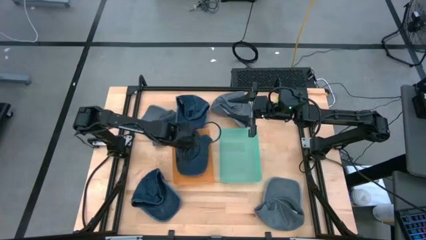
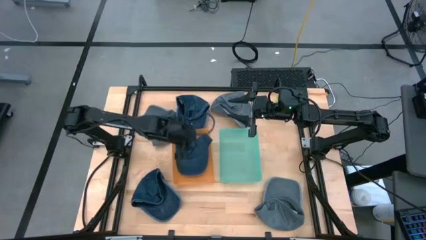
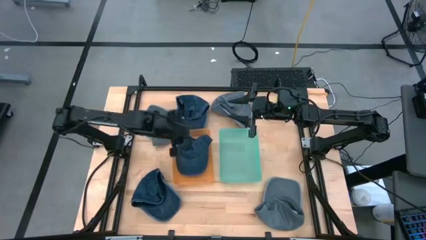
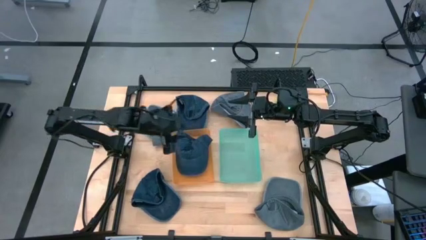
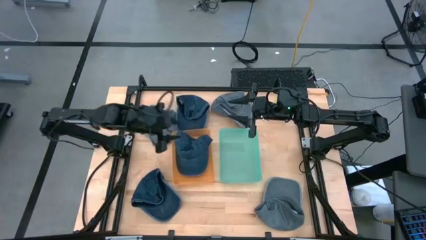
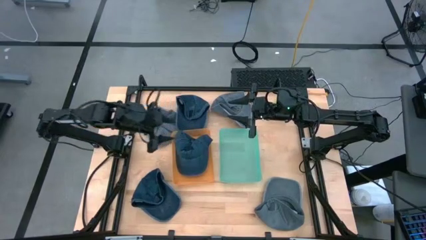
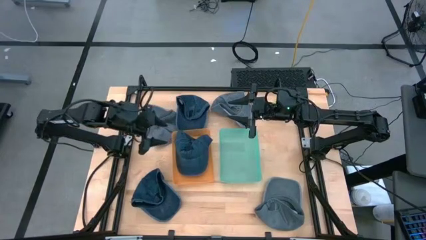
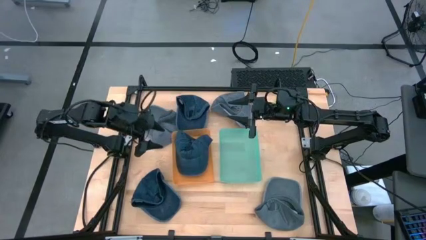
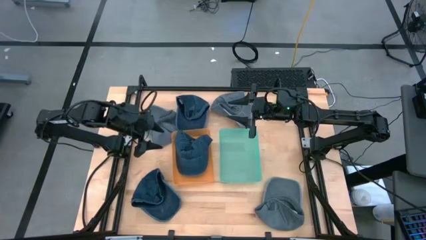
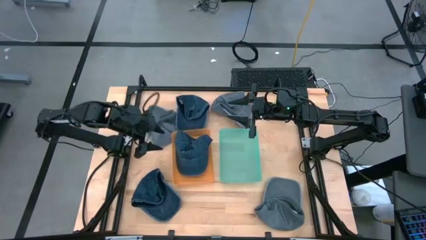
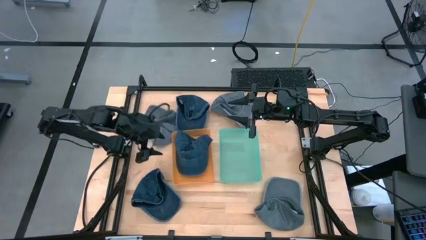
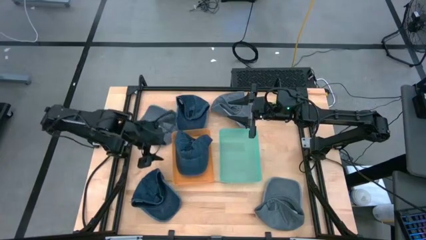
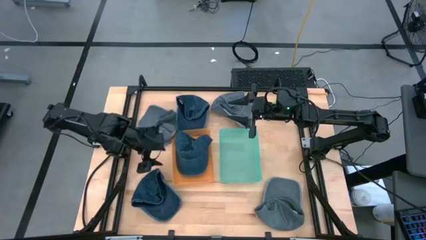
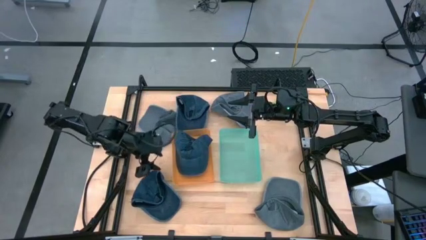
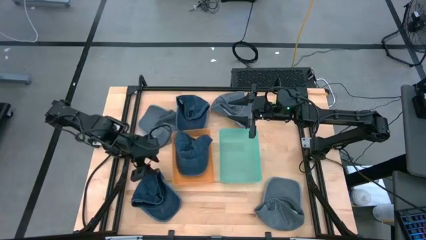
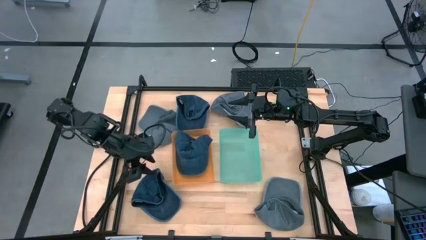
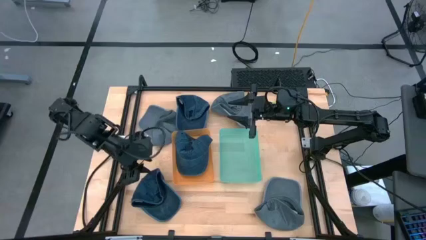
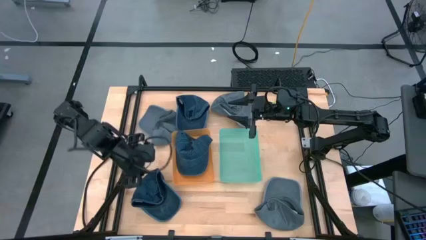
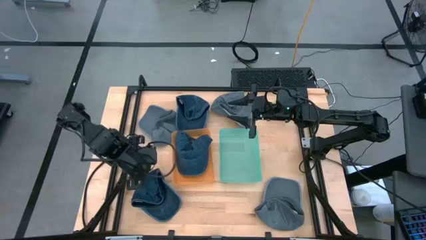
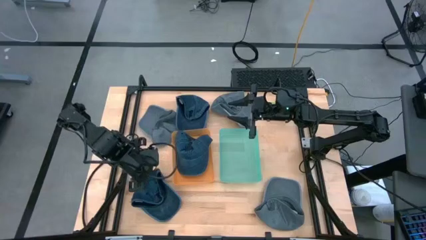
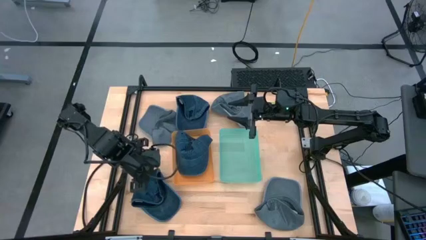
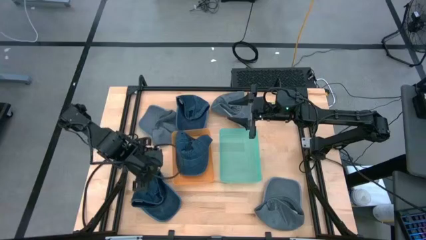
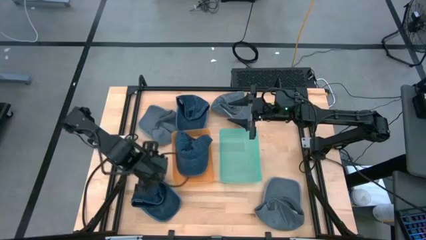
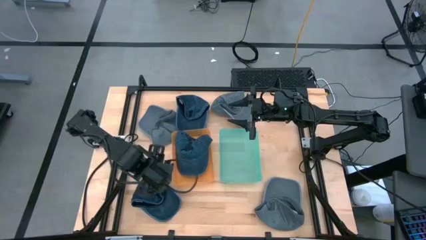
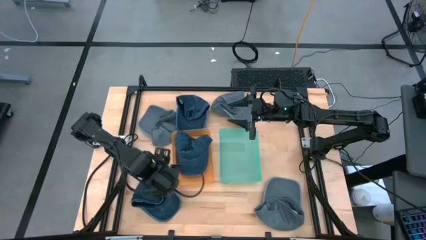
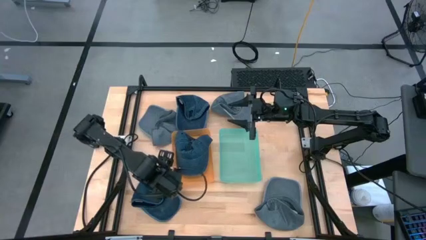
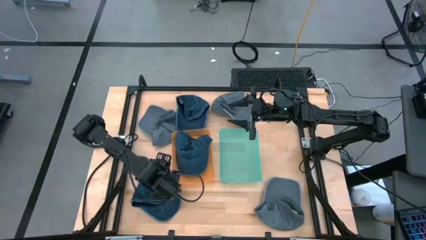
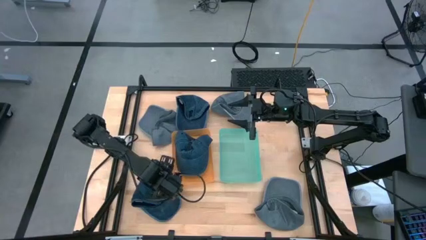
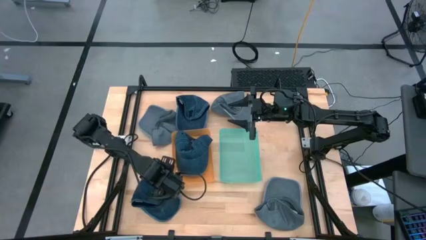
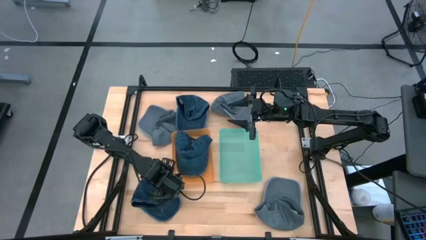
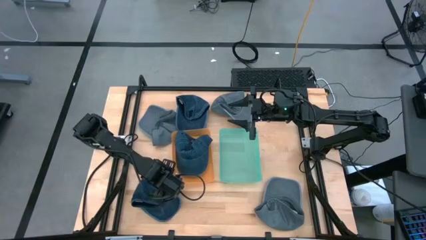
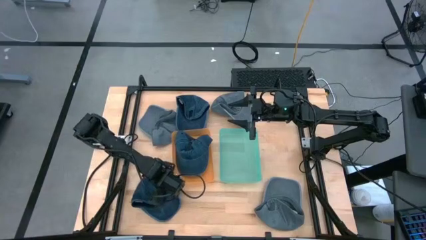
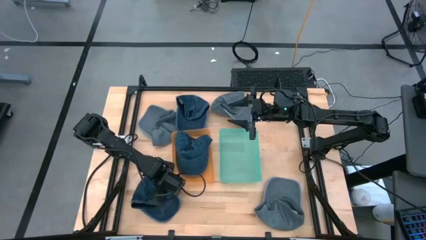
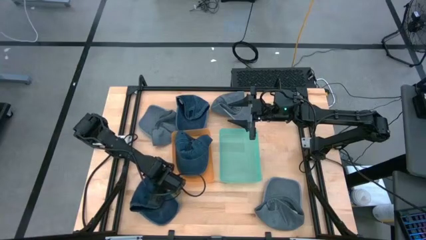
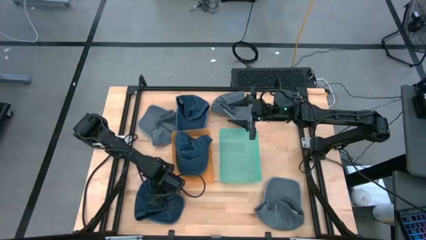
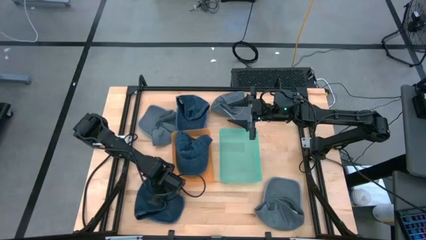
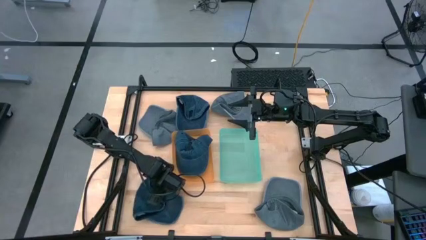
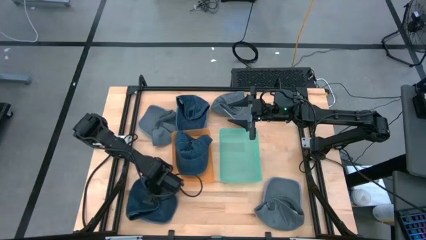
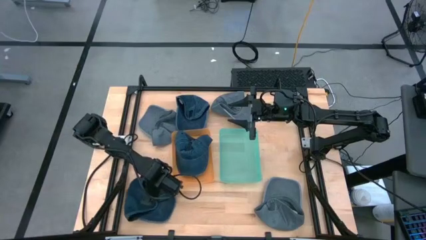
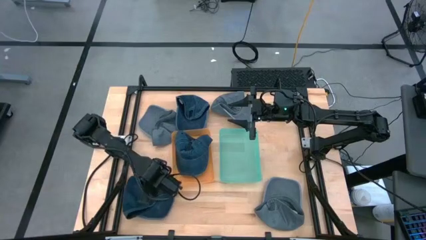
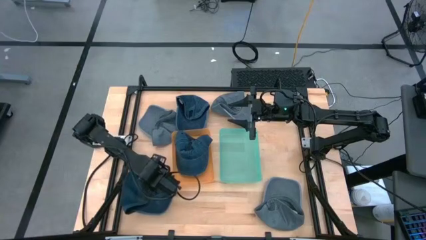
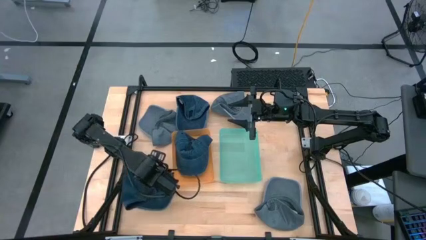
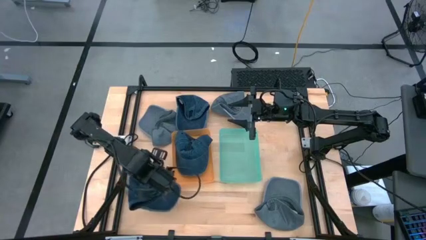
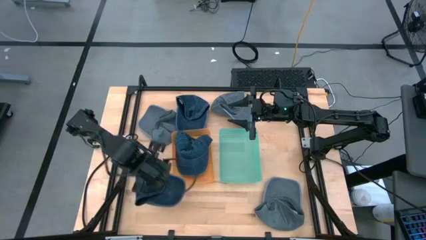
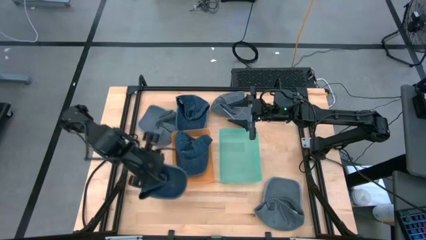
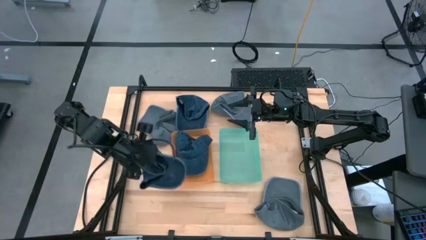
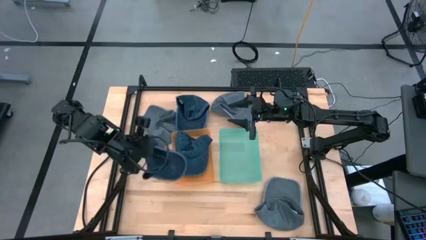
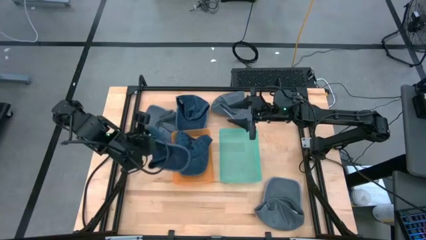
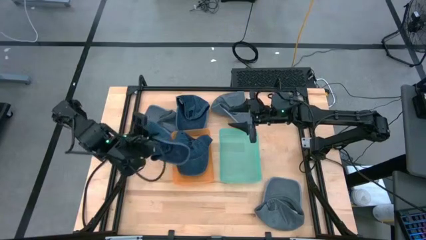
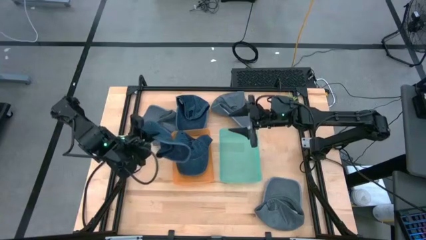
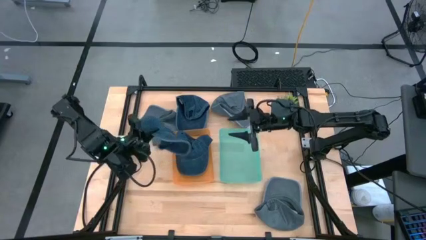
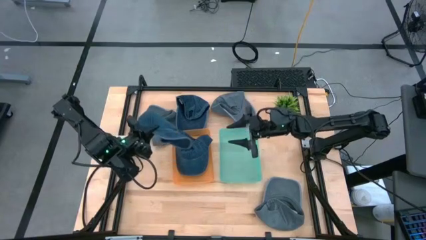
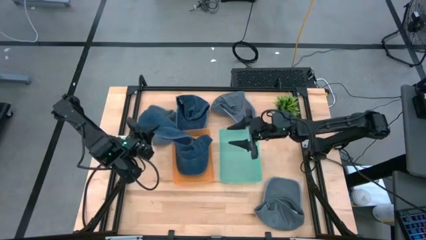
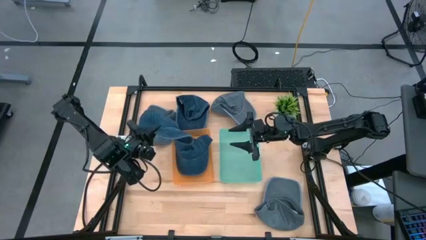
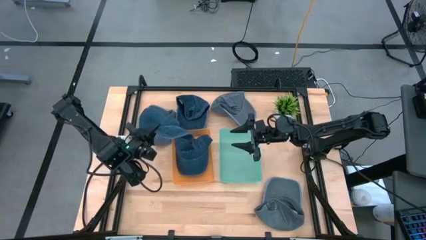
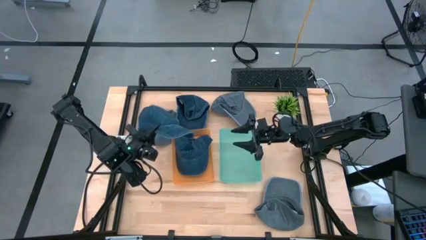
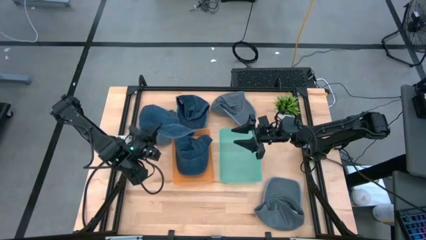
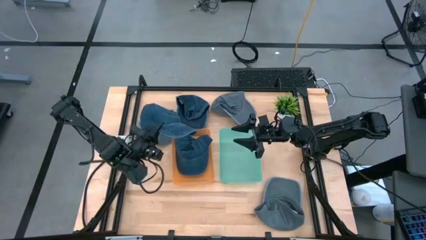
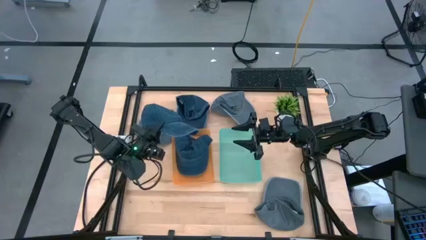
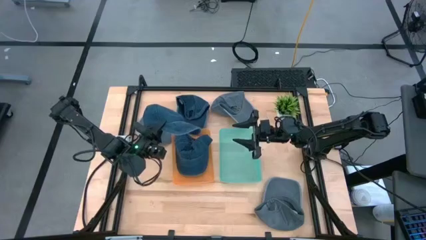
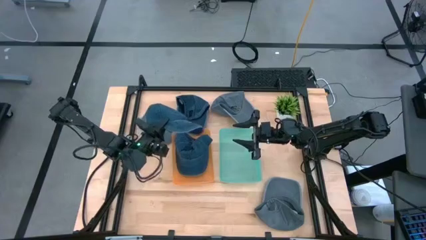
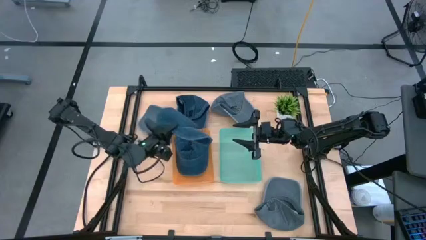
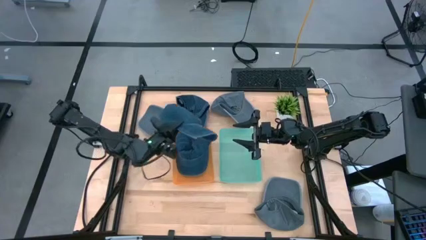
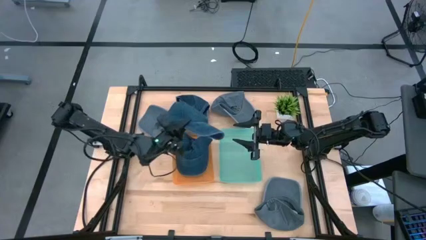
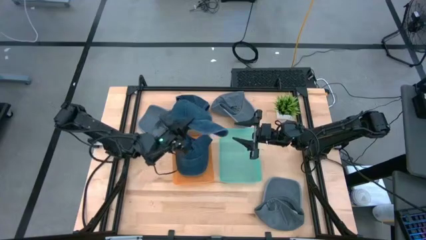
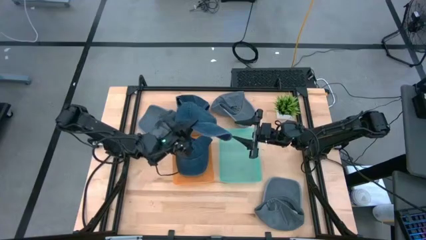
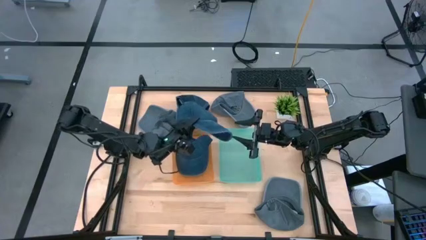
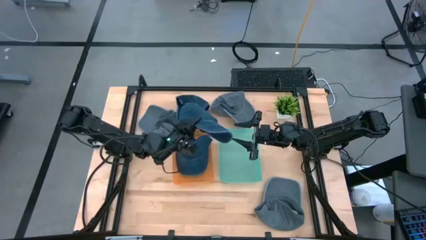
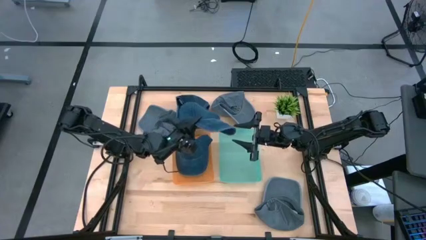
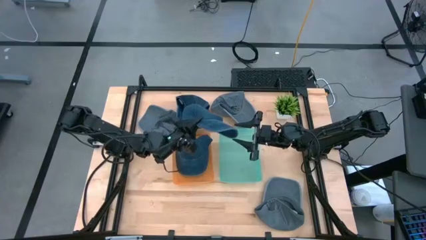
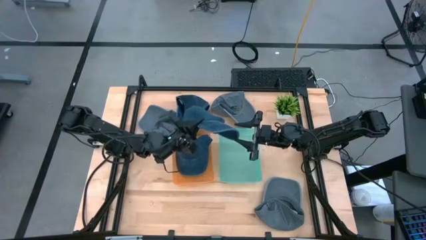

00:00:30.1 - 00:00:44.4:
Task: Pick & Place hat
Put the bottom blue cap into the orange bin

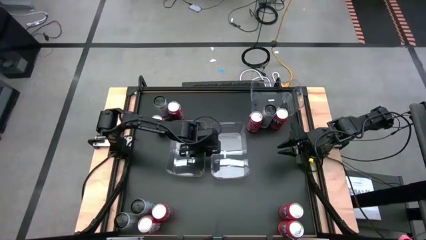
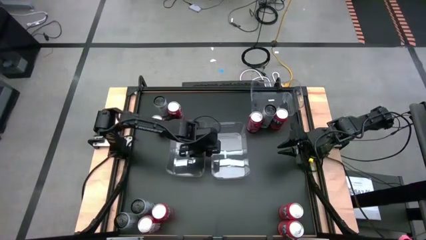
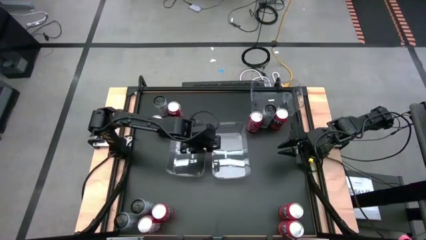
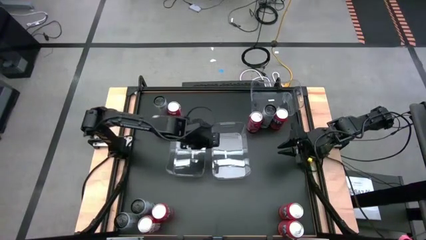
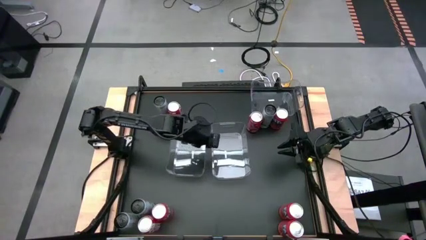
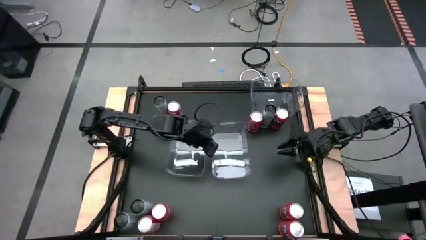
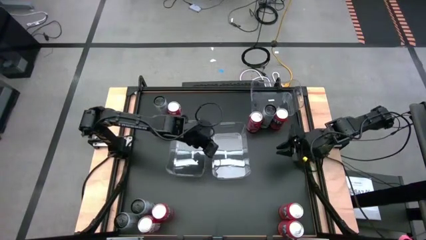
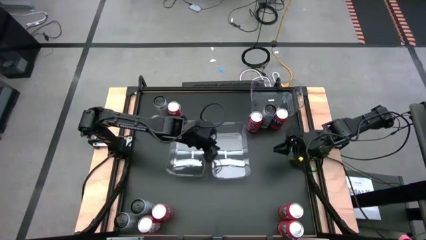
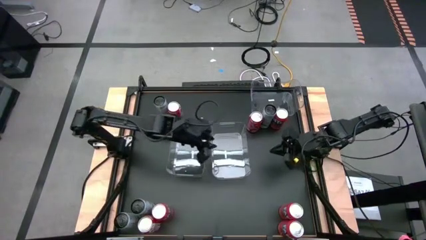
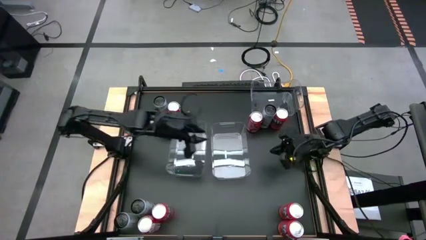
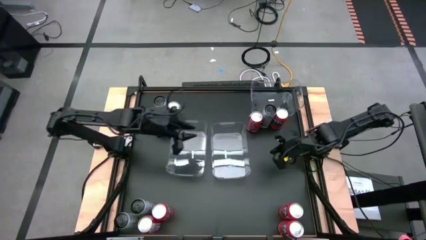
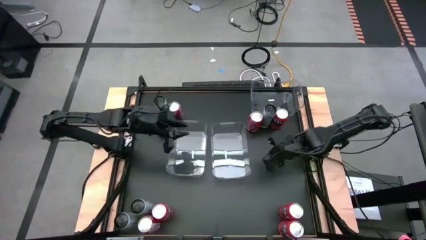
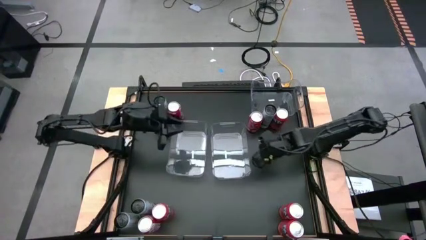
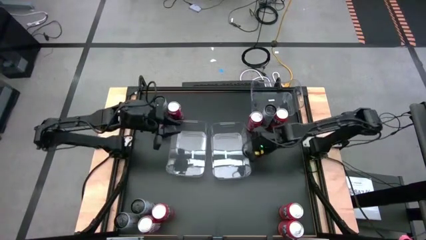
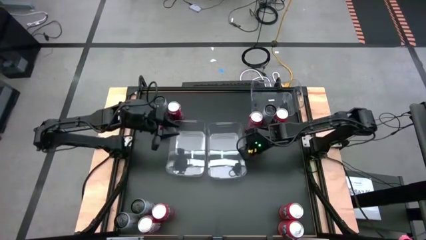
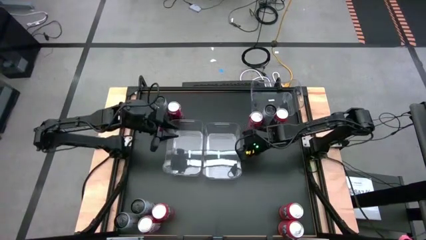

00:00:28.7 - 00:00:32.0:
Task: Sort soda cans
Adjust the bottom right transparent bin
